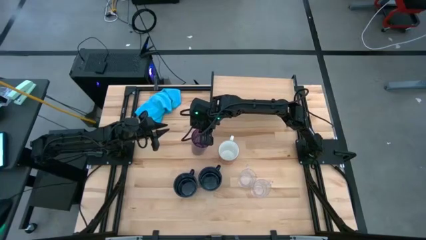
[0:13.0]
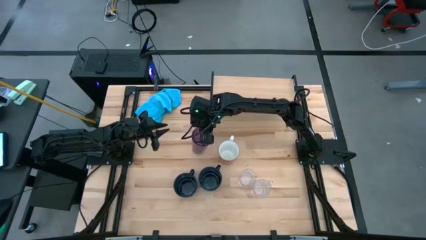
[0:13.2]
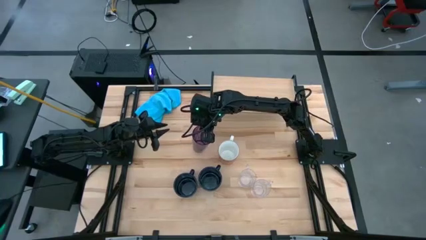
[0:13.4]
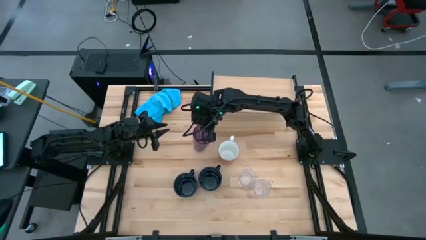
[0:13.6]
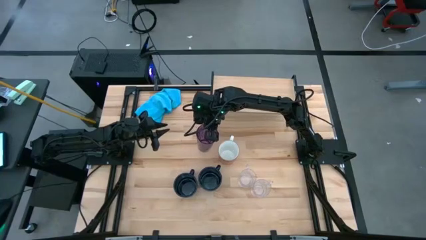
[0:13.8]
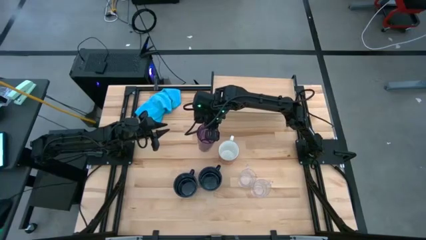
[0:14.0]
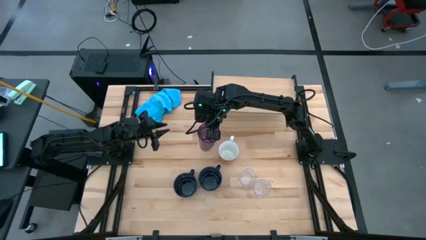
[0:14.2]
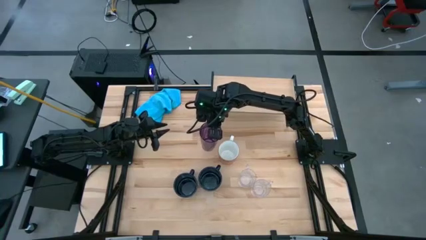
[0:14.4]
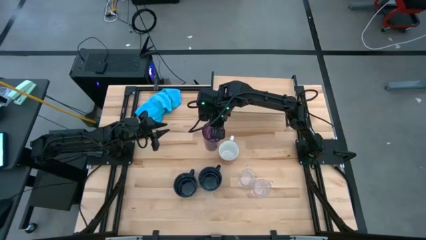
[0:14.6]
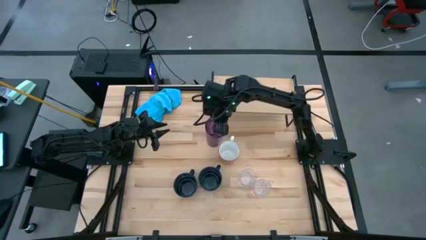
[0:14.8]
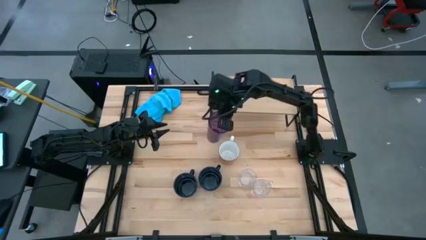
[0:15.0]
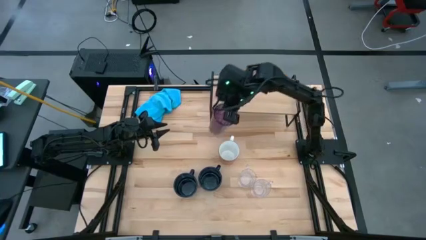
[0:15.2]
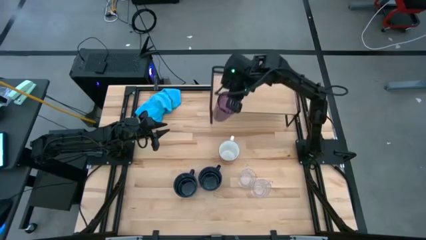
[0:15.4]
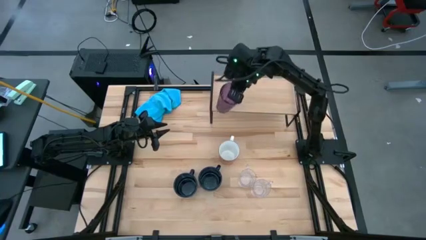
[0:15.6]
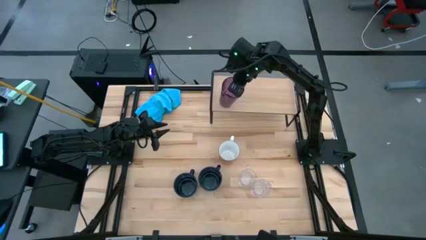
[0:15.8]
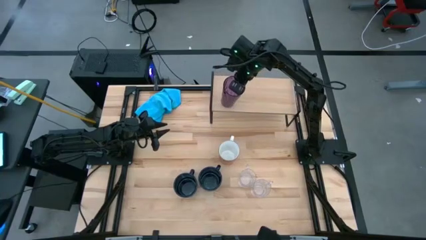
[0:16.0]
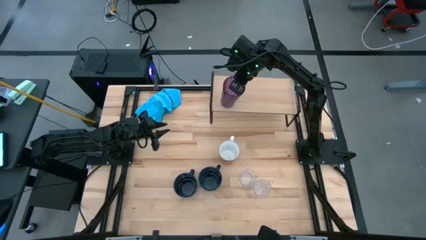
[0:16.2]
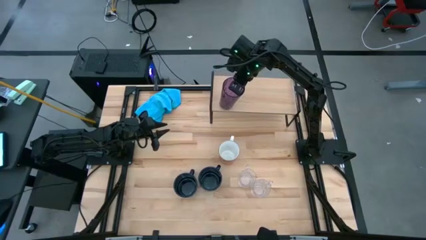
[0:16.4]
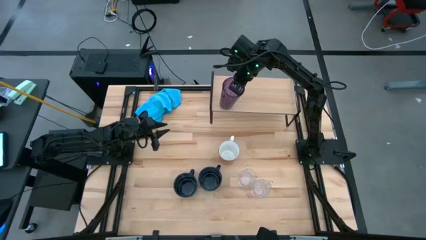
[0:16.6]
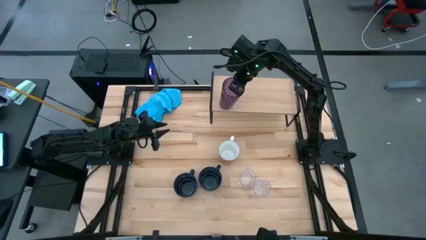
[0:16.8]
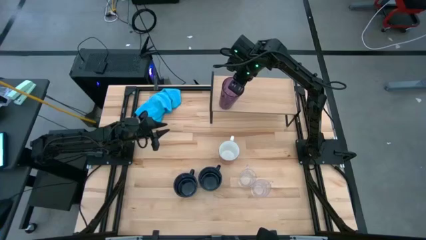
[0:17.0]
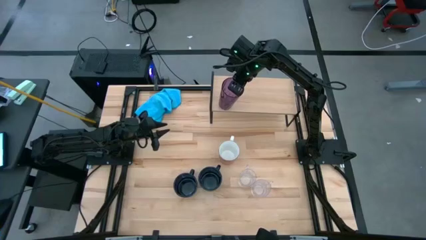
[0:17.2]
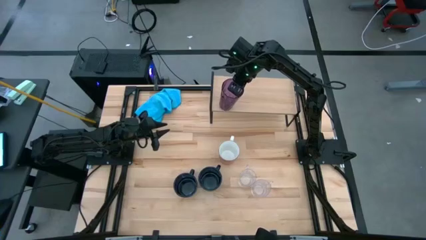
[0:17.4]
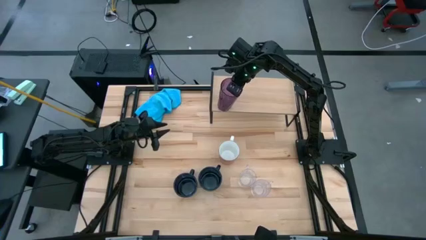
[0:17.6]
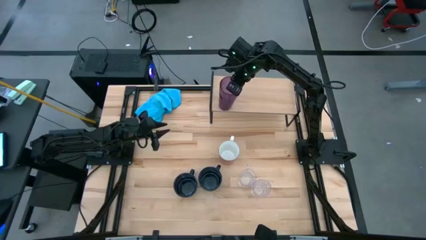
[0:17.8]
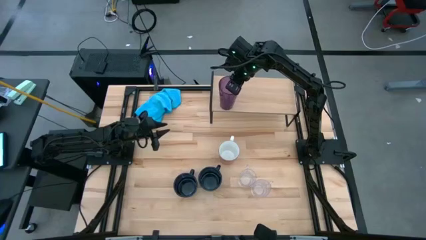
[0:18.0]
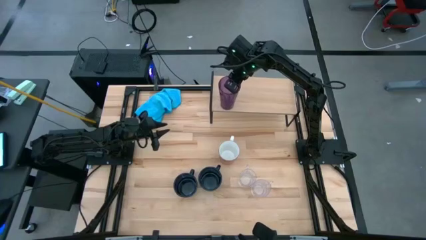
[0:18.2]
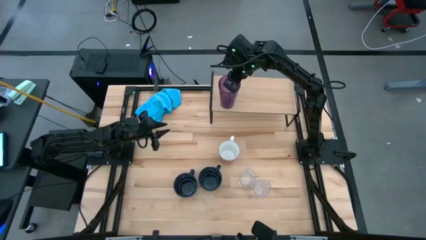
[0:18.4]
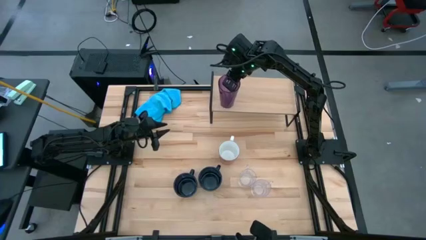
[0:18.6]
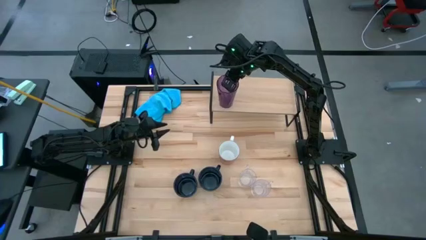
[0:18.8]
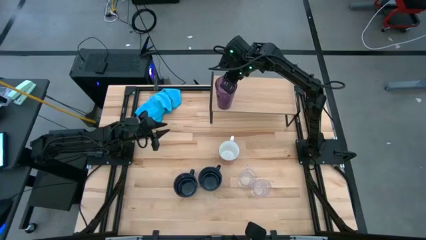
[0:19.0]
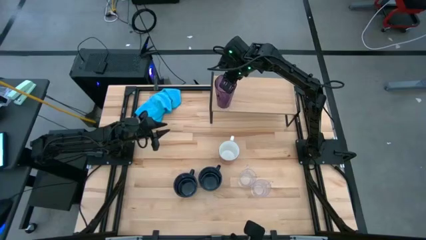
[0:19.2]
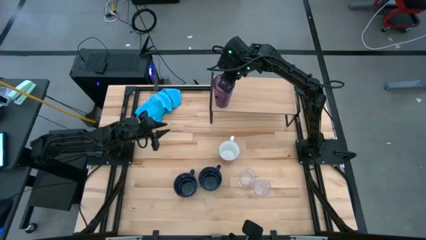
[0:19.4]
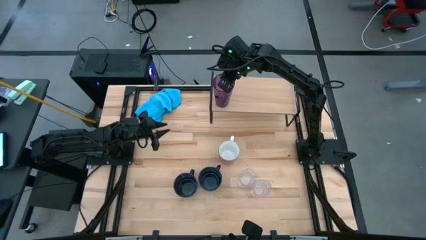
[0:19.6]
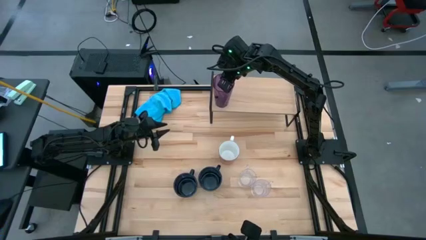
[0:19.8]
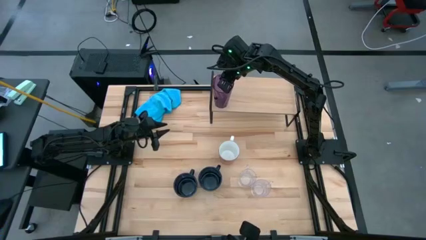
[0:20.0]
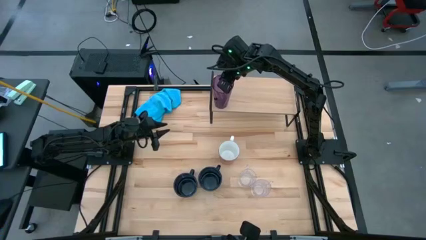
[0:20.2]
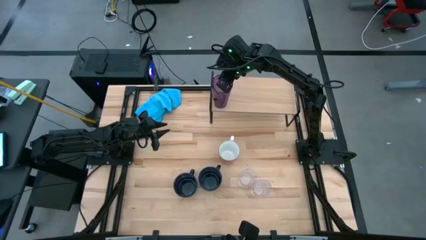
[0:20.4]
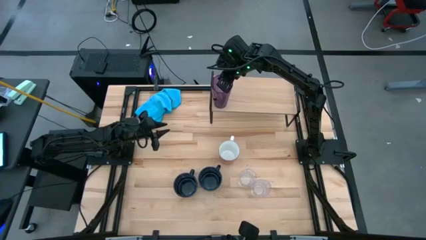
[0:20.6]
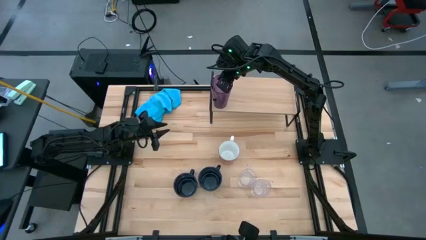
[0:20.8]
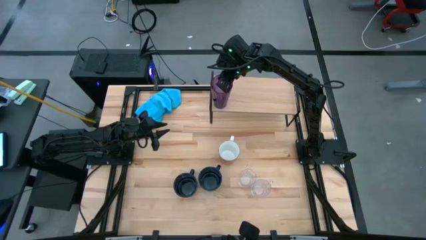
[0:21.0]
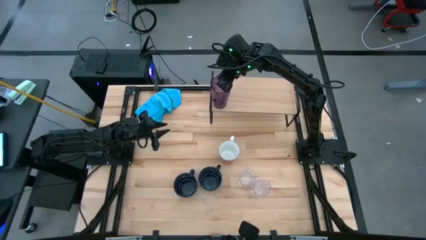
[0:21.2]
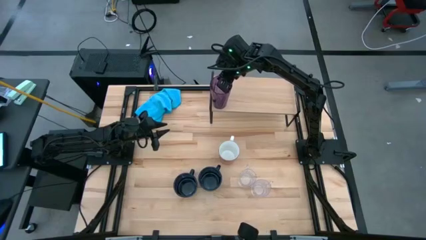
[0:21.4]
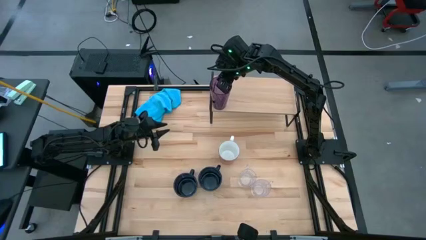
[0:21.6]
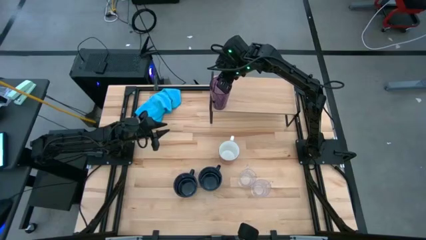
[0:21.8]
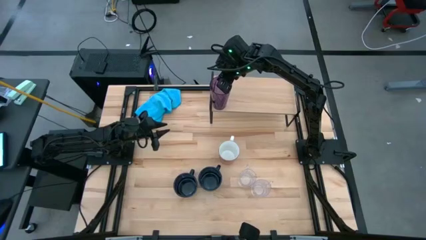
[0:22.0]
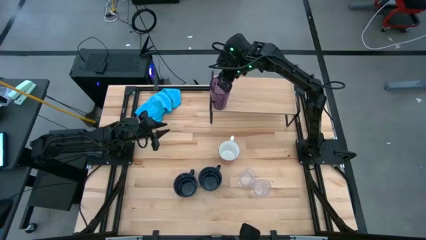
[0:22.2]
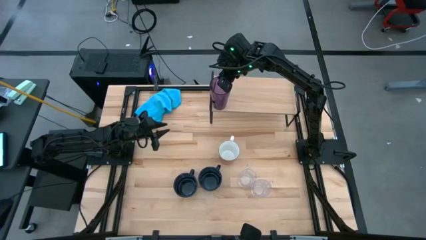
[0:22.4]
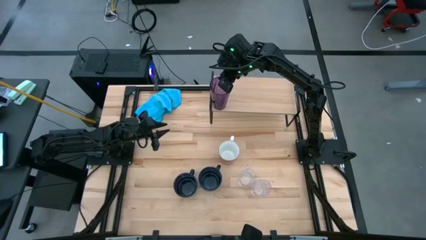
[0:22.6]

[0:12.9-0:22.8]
Task: Stack small to large cups/mugs on shelf
Put the violet cup on the shelf

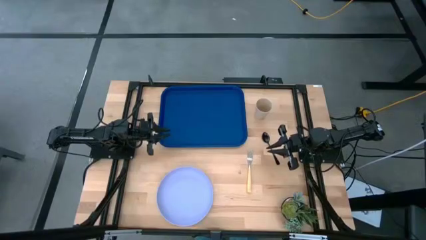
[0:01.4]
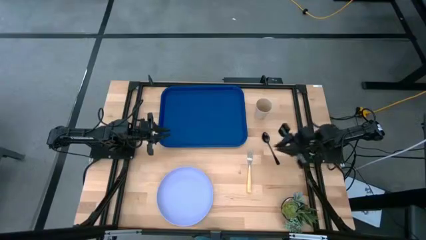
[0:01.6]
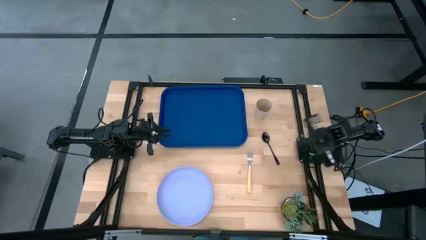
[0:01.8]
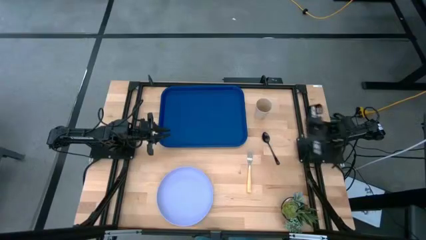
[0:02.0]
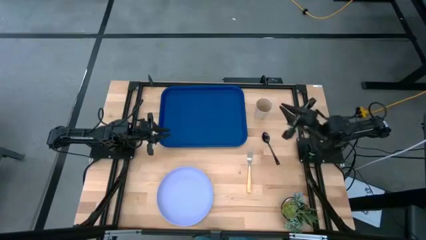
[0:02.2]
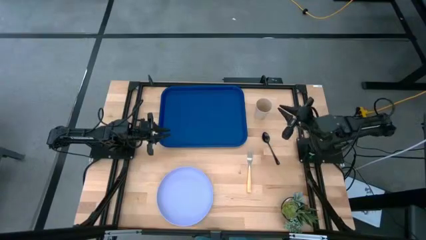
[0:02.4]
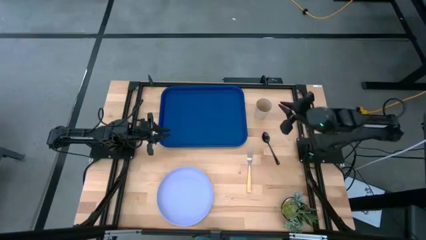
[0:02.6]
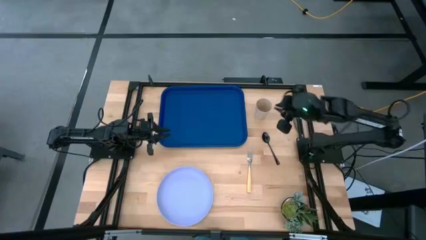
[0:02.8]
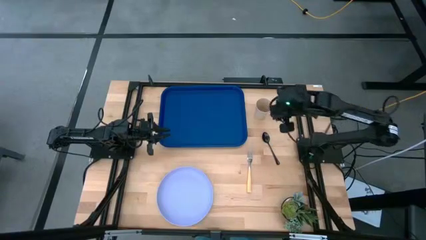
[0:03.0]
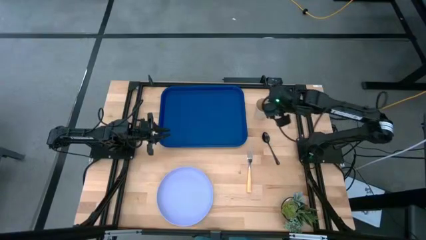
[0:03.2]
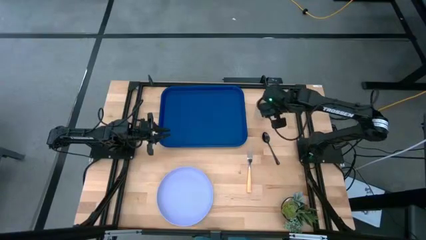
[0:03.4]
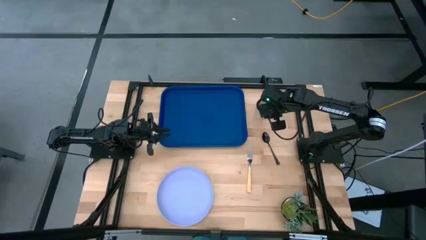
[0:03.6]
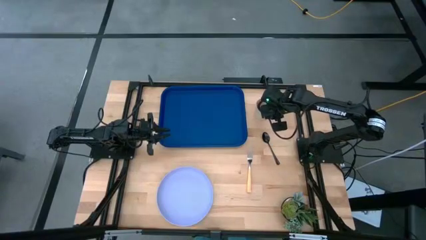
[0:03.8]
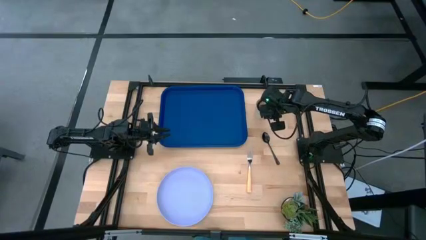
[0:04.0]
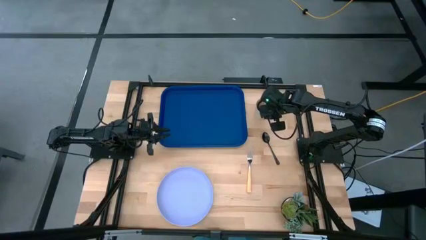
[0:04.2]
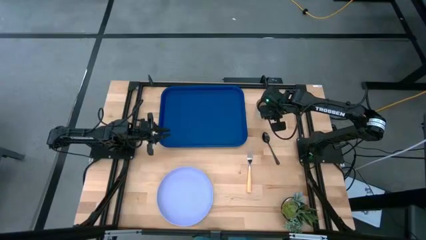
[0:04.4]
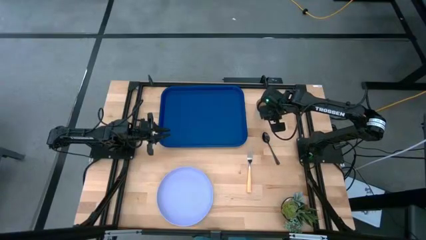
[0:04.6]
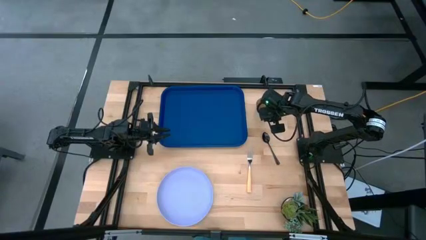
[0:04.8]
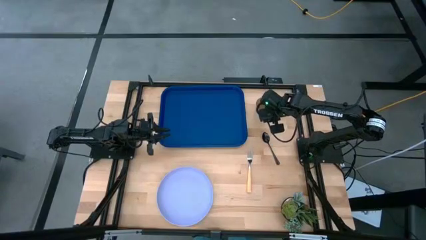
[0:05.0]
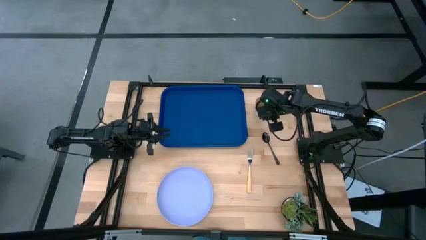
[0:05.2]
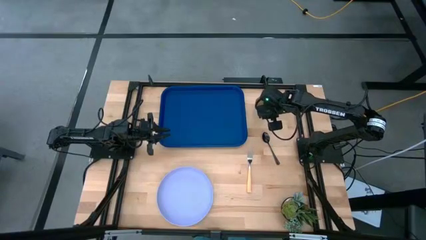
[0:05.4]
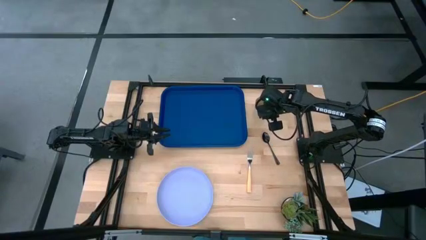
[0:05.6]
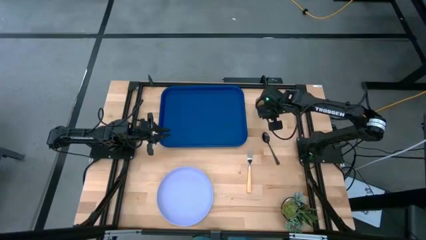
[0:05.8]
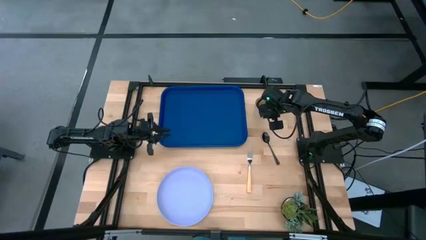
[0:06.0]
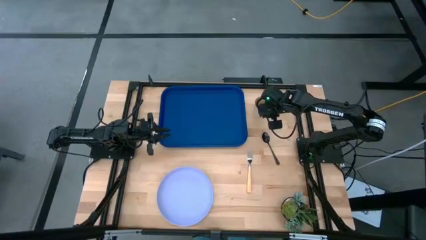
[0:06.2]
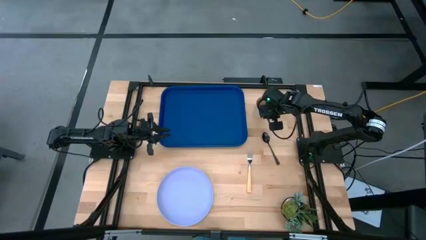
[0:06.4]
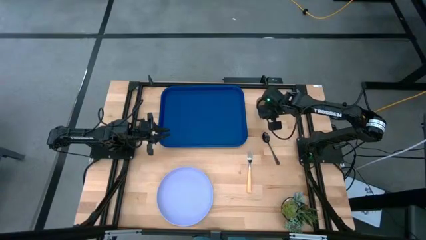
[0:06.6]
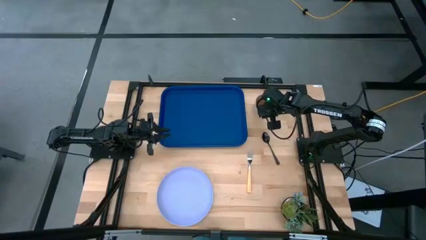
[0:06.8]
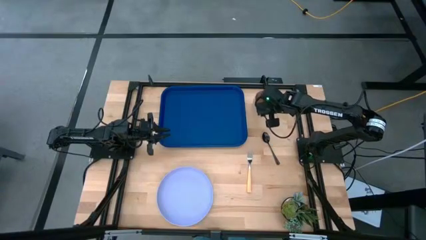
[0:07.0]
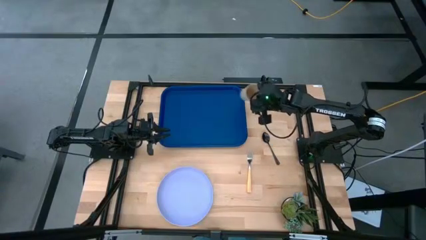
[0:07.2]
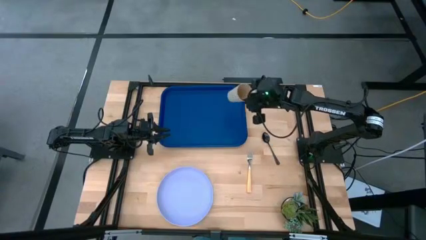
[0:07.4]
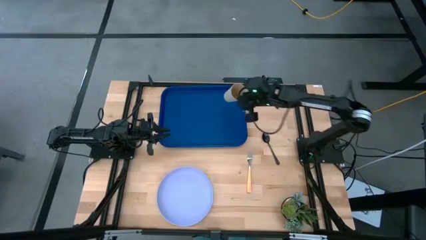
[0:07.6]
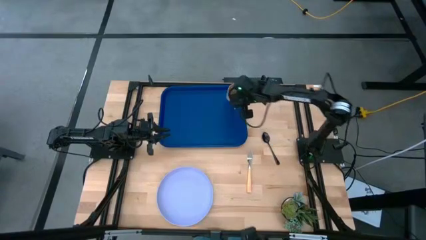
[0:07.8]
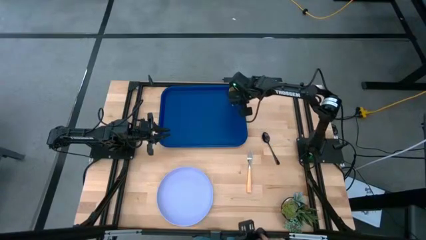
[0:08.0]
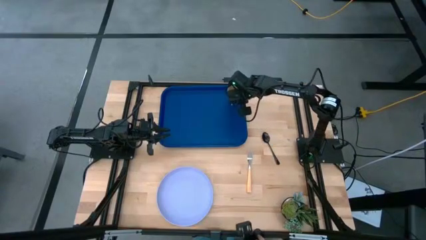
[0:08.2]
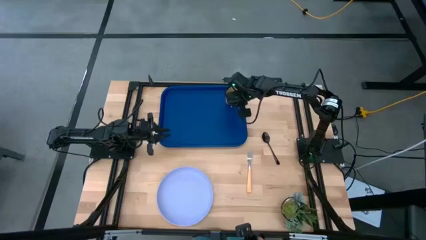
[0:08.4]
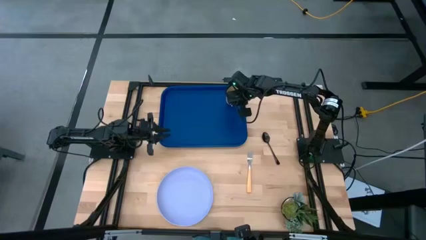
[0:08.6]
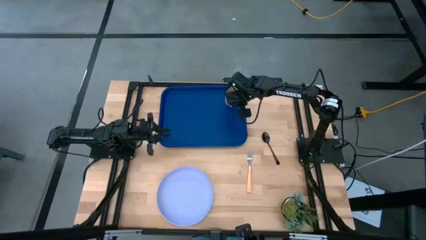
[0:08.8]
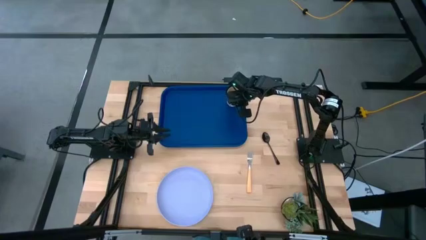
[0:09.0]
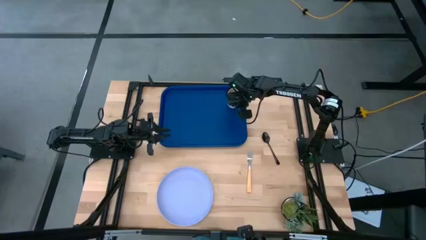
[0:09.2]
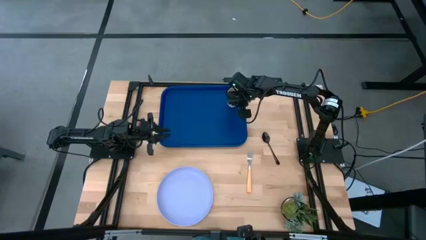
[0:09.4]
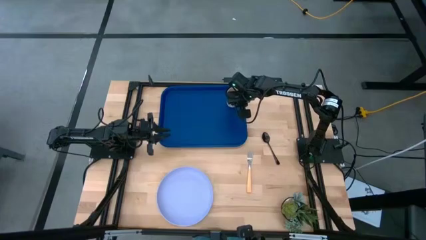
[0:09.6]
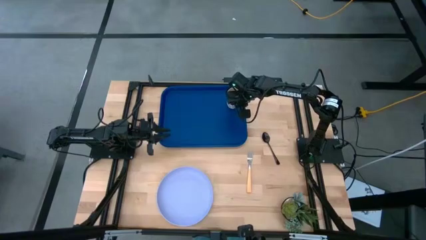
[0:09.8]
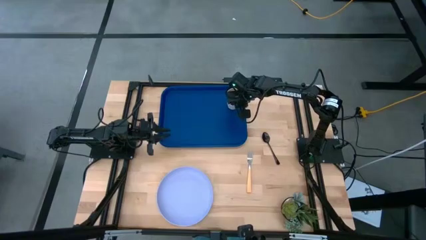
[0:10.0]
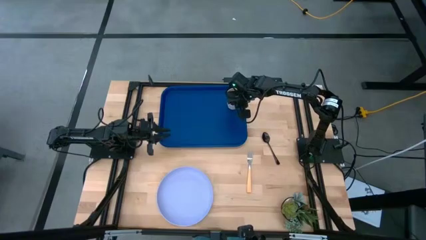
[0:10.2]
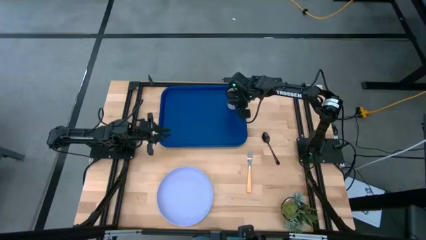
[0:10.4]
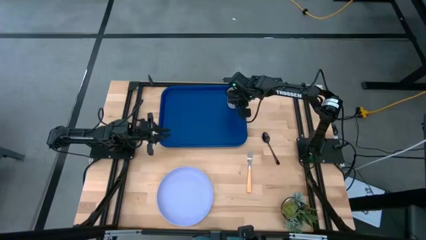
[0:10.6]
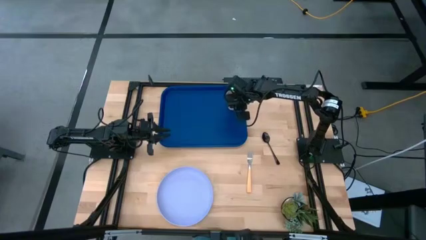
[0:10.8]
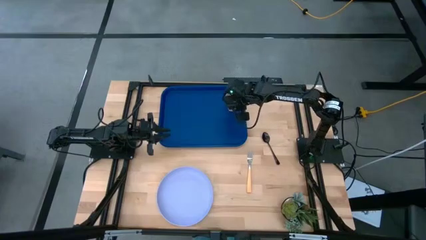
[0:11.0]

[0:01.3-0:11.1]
Task: Pick and place plate/cup/fork/spoon on tray
Put the beige cup on the blue tray
